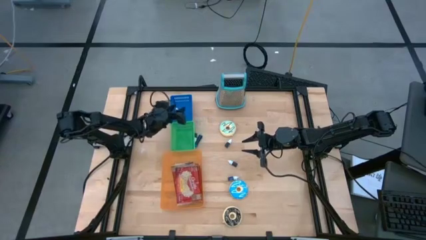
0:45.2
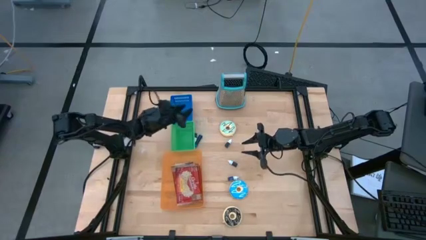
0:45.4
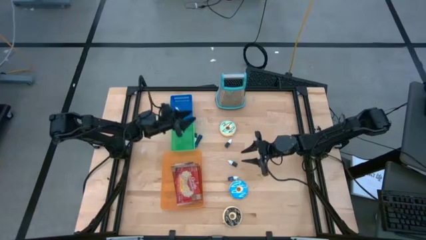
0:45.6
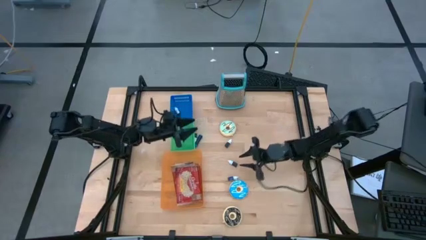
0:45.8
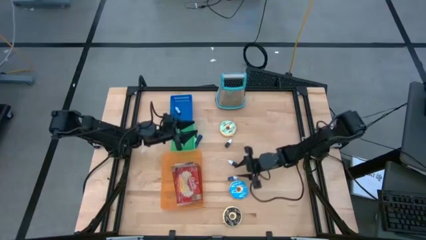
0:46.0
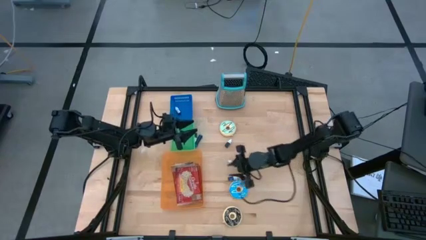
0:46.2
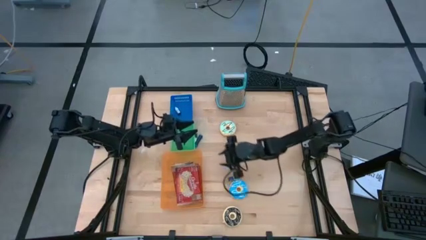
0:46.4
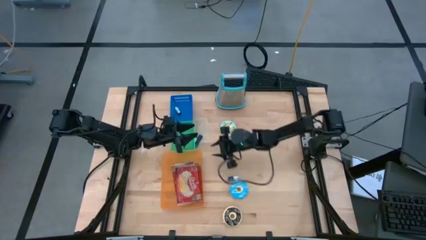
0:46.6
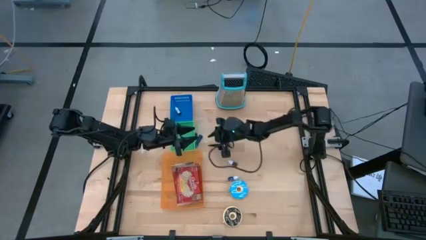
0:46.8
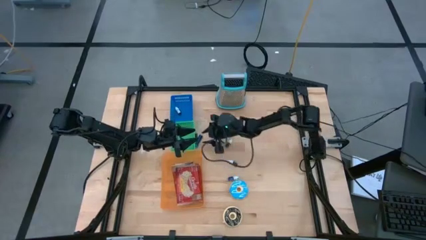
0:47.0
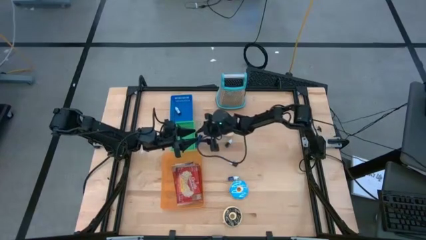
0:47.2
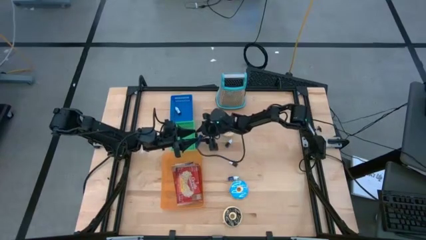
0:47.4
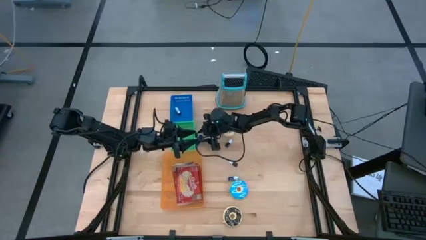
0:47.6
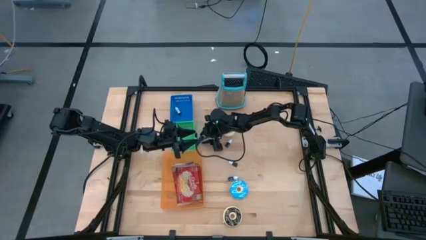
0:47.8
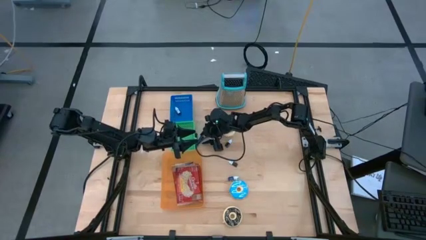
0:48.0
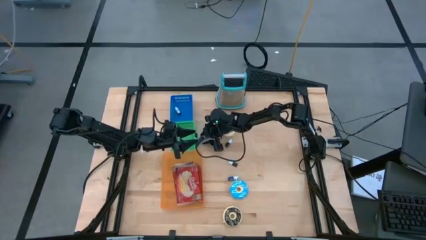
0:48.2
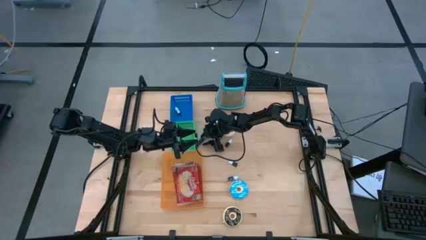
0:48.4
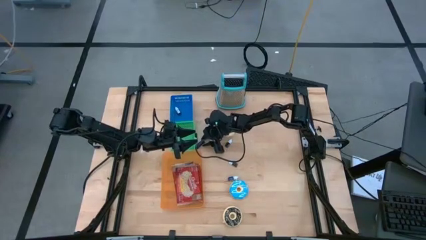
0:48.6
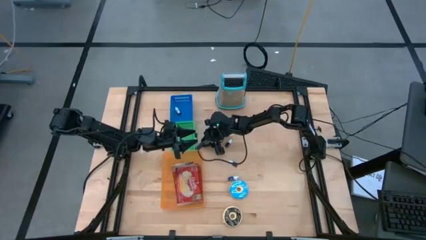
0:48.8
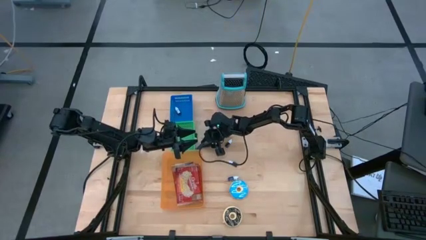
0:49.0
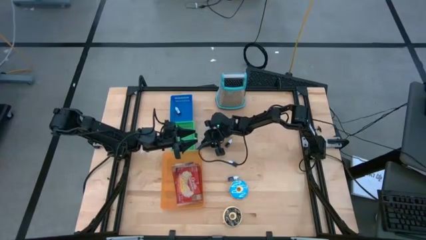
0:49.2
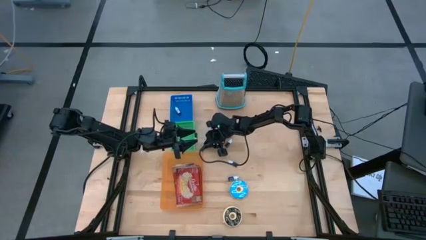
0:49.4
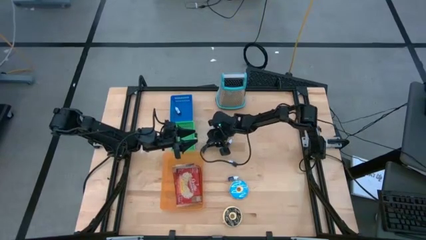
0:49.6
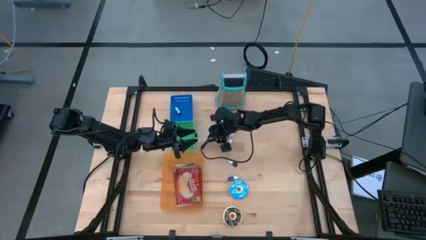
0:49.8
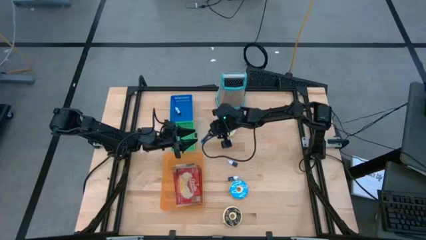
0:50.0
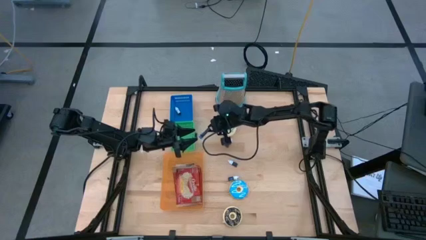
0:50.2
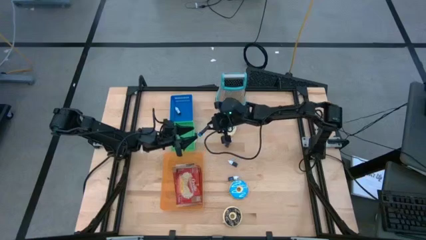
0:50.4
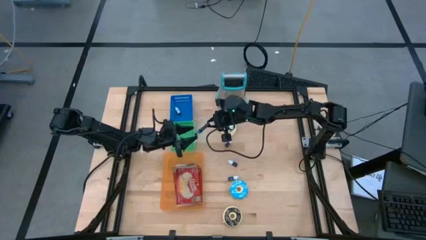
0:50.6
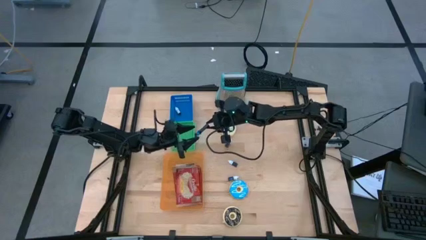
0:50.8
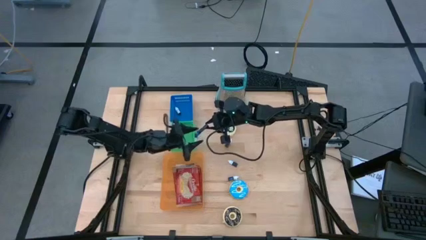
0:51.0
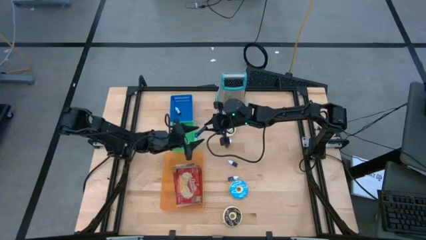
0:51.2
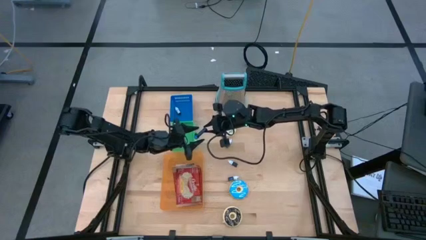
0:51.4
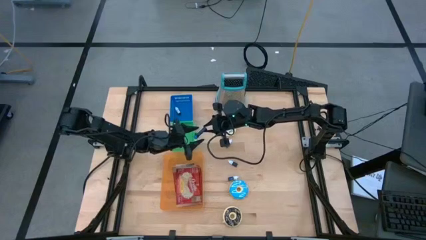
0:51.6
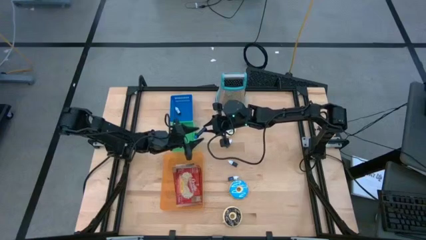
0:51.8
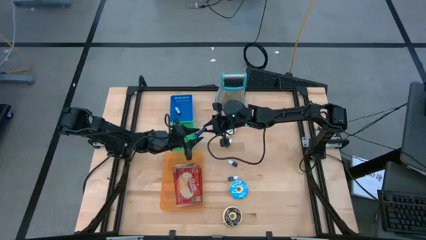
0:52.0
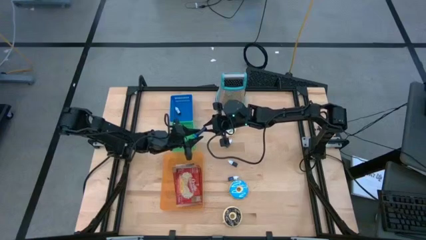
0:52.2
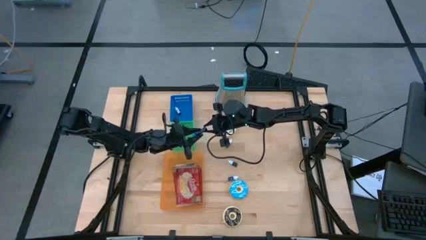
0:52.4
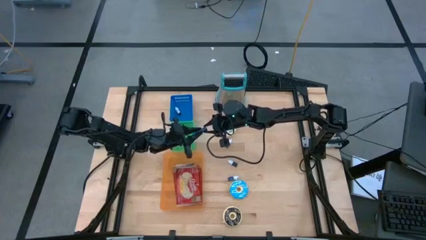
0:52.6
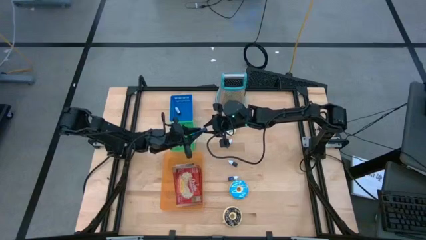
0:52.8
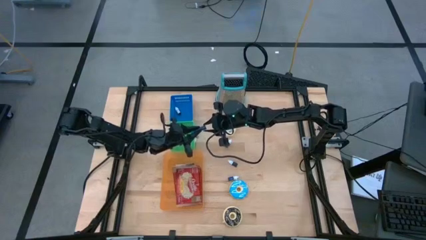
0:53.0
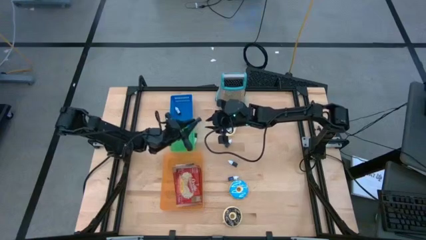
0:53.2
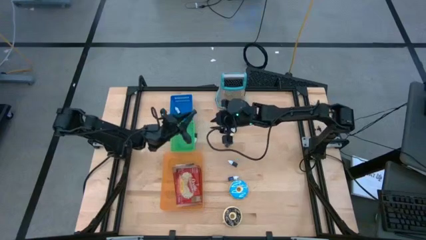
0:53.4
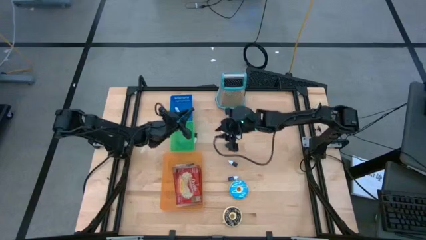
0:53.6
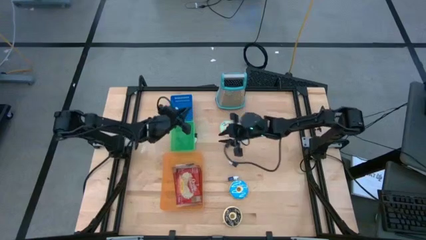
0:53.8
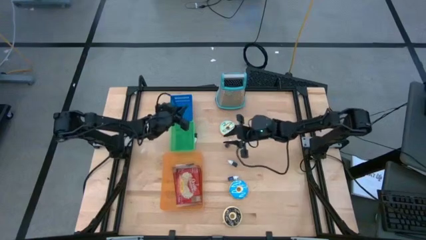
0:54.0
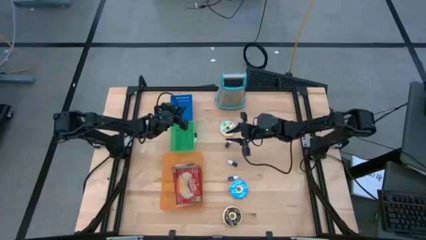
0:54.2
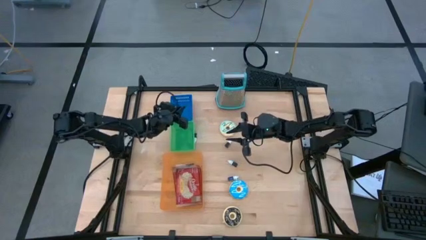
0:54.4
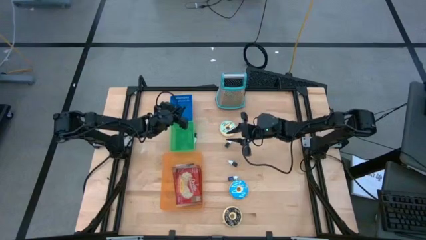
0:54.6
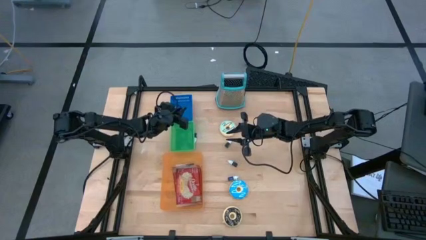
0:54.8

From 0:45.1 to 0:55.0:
Put the large blue food coloring bottle into the blue bin

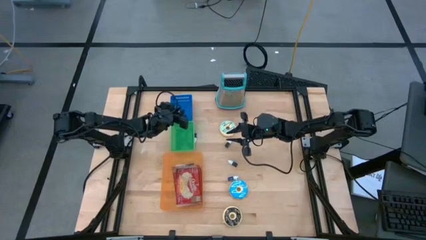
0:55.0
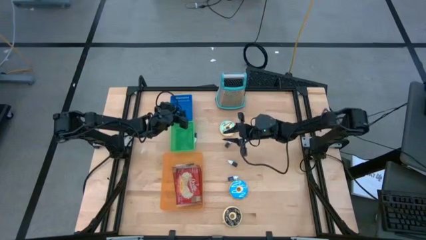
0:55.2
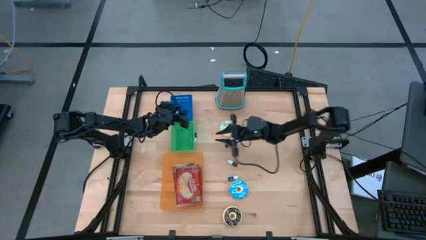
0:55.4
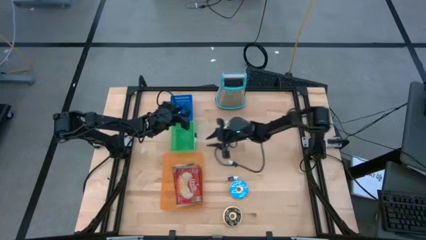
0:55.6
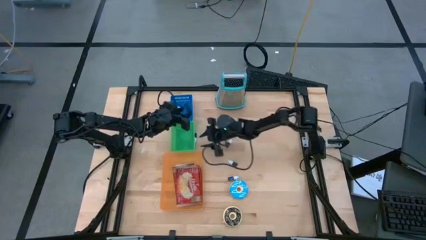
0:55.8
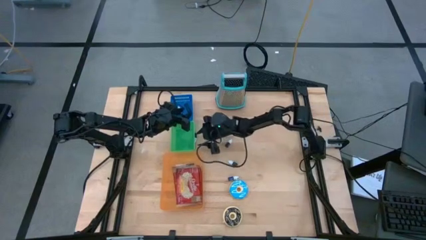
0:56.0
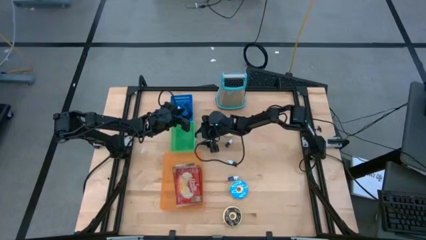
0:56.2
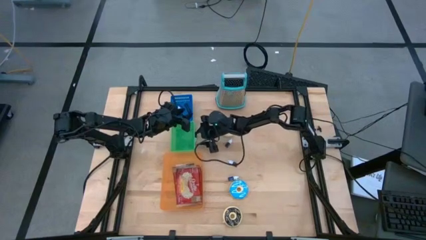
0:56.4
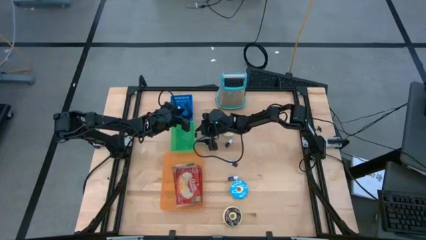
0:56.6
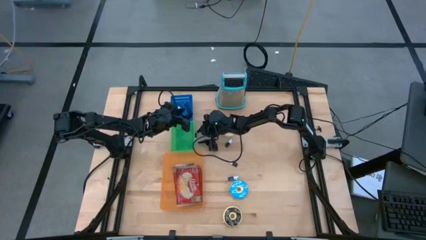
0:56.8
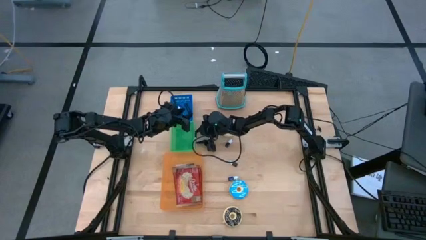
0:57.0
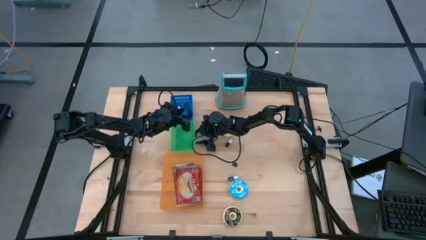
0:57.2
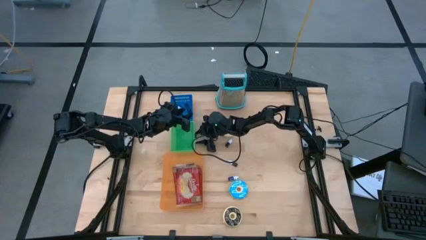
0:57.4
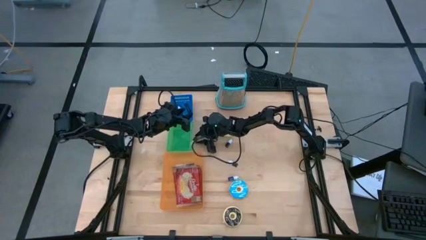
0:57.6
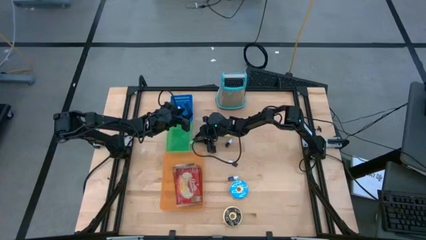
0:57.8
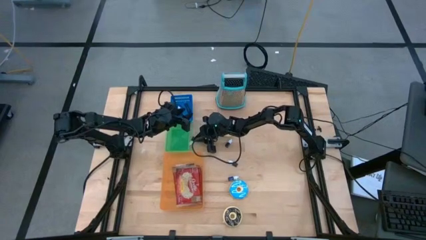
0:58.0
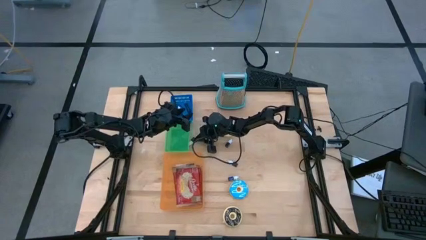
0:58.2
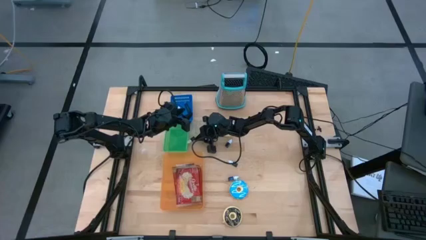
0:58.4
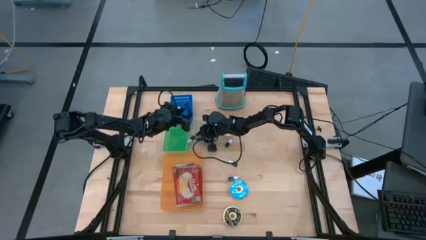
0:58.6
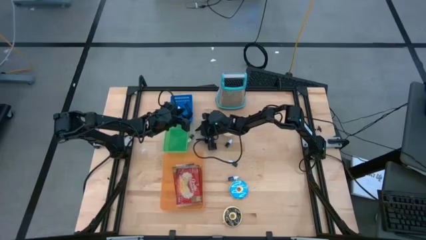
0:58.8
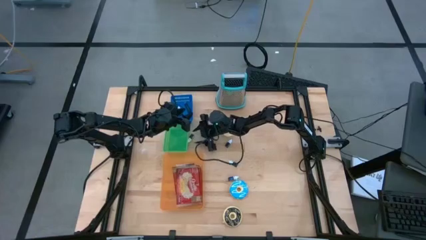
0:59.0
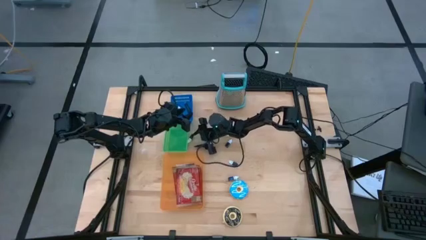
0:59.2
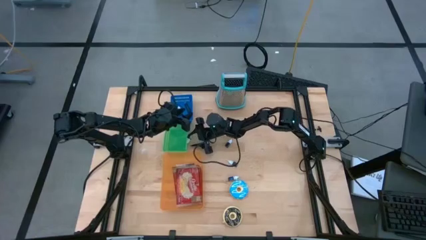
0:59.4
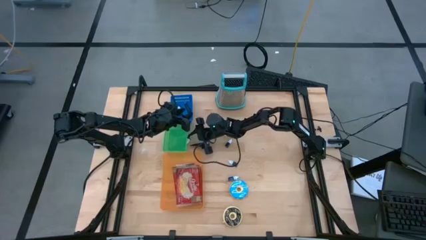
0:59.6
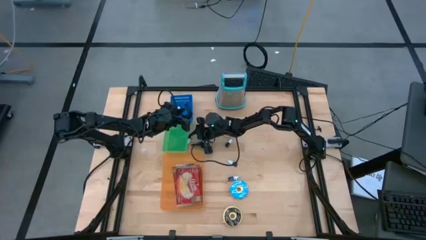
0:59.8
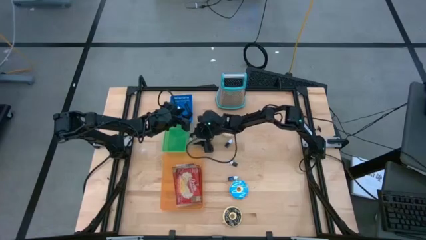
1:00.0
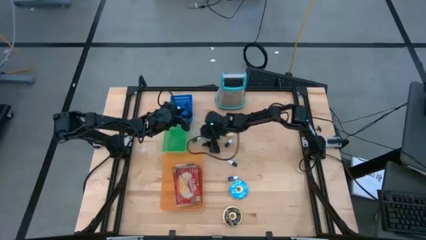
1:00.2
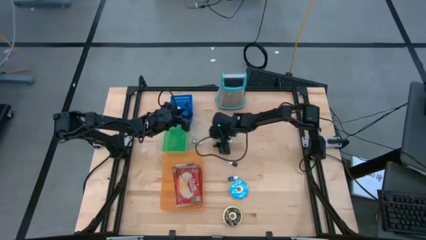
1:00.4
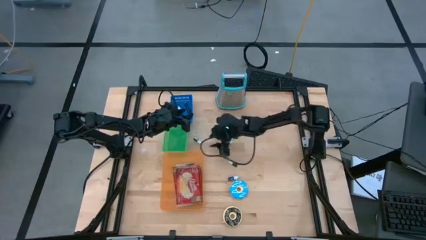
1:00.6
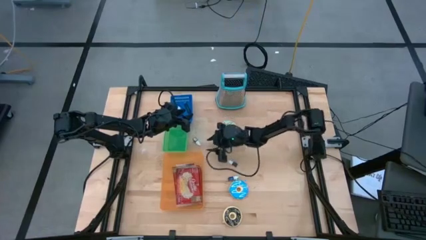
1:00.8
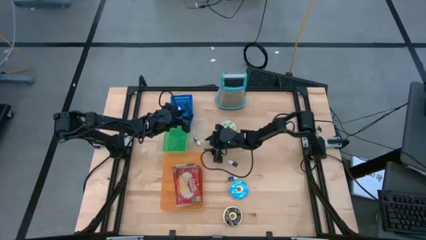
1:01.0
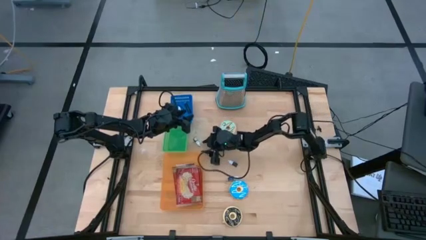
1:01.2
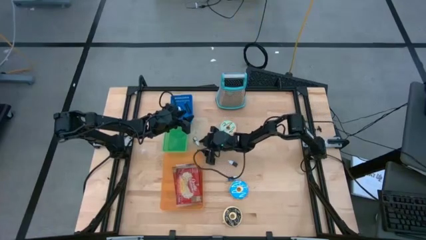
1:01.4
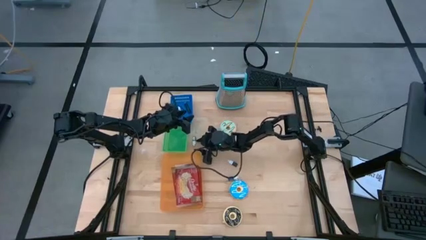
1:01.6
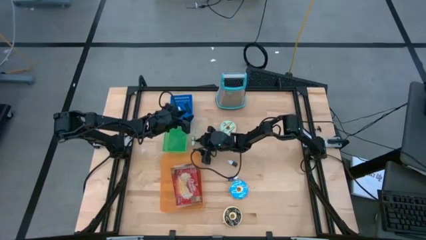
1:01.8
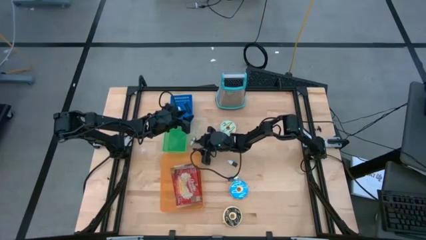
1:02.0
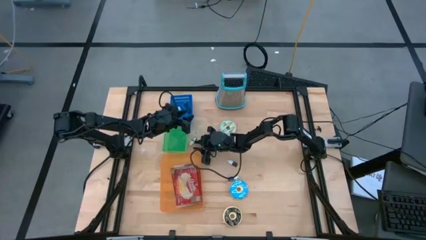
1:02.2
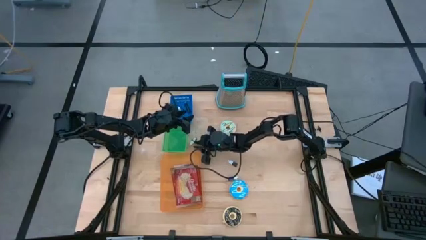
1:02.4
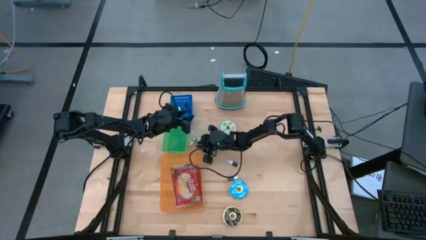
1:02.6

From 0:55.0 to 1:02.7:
Put the brown food coloring bottle into the blue bin
